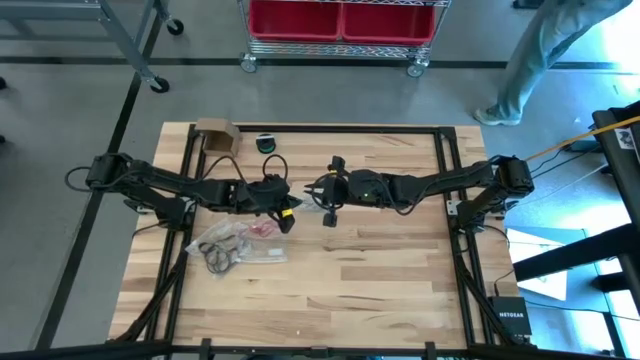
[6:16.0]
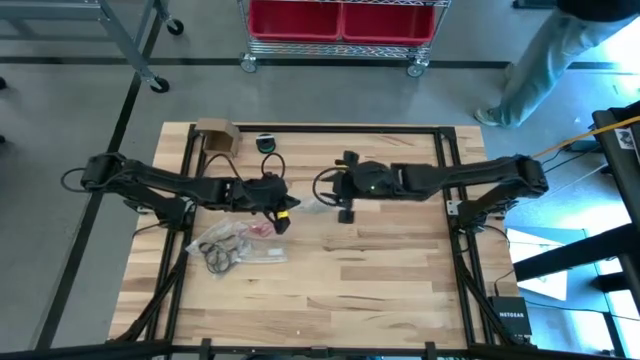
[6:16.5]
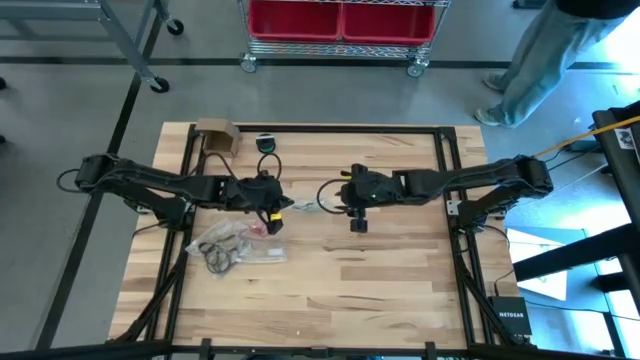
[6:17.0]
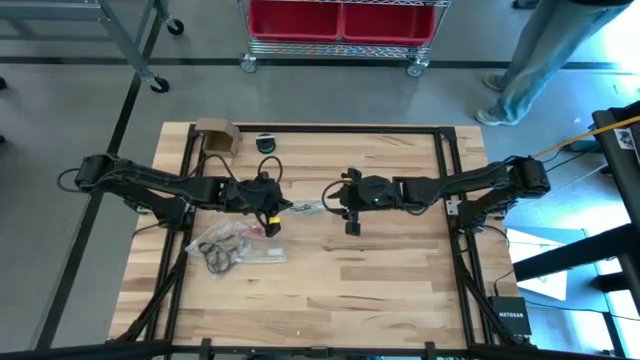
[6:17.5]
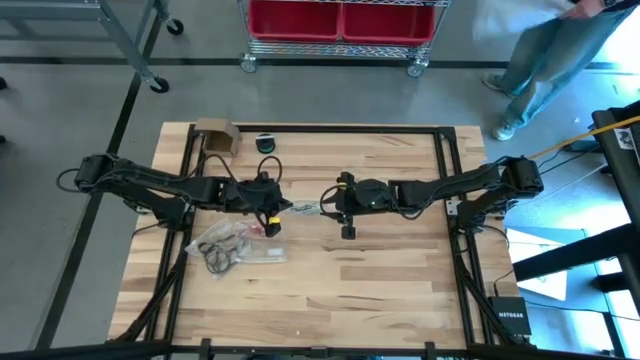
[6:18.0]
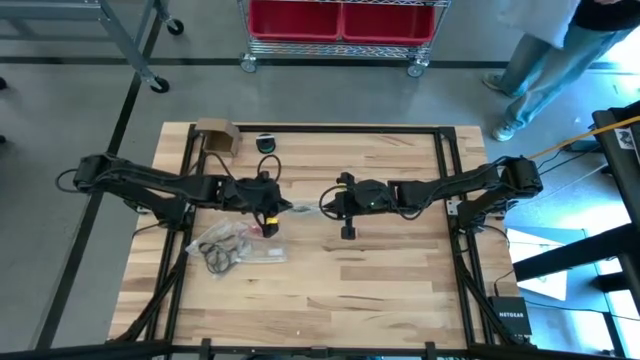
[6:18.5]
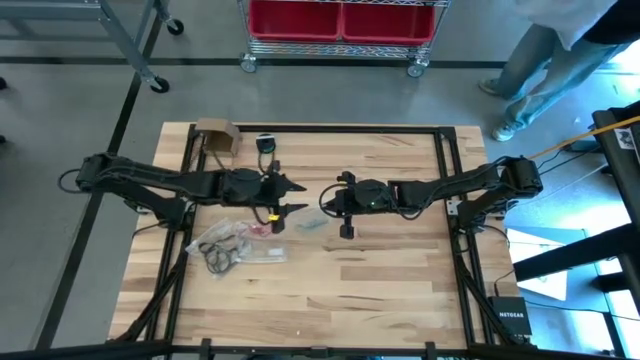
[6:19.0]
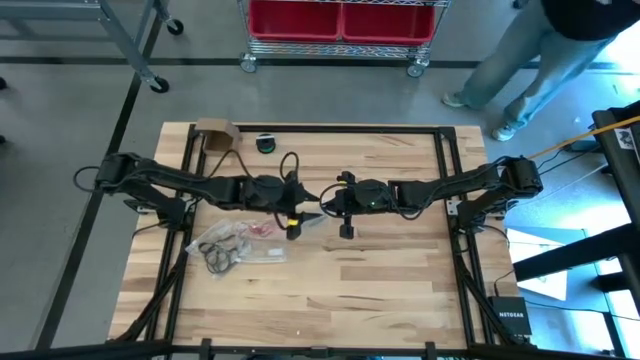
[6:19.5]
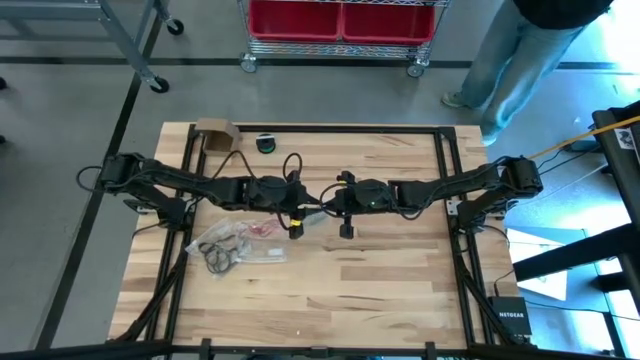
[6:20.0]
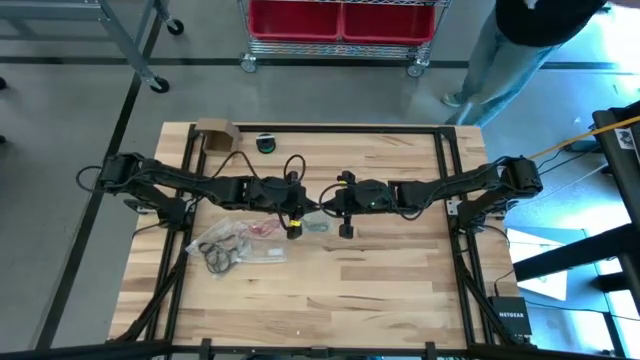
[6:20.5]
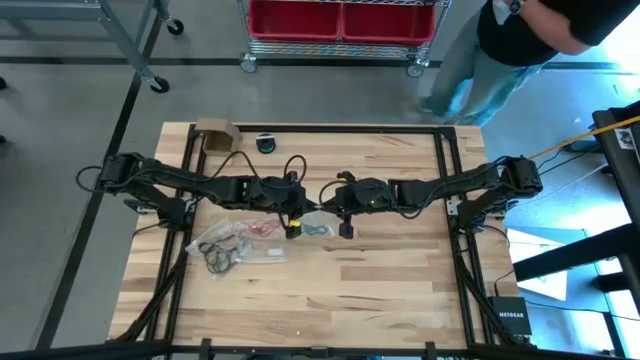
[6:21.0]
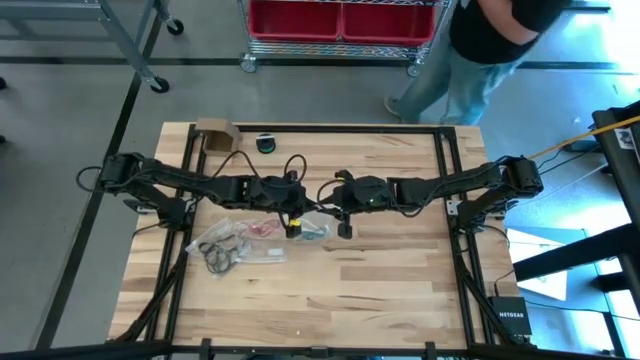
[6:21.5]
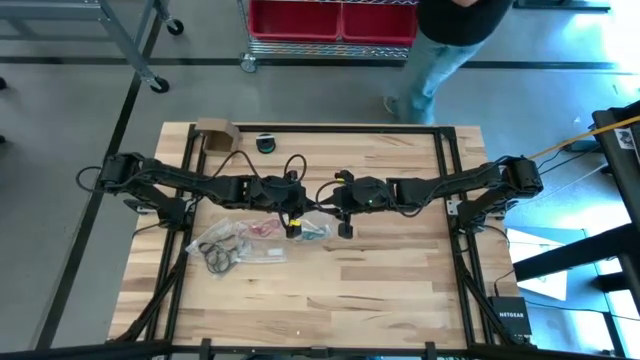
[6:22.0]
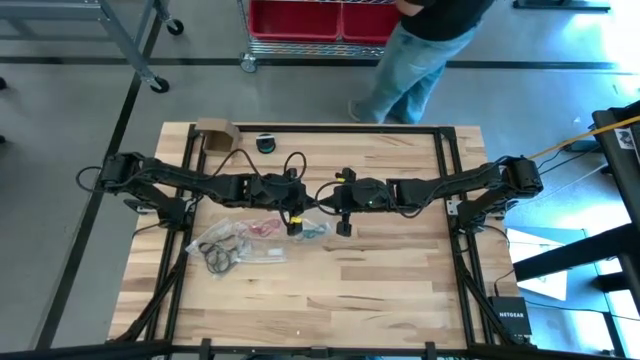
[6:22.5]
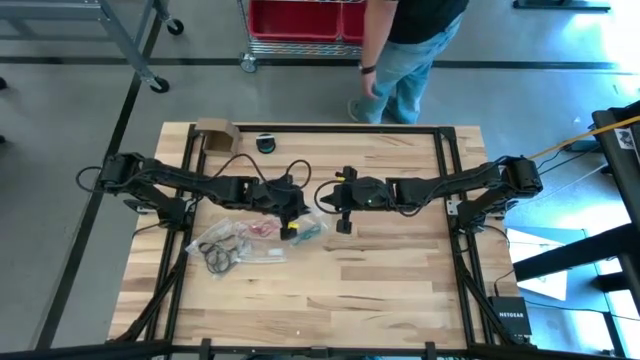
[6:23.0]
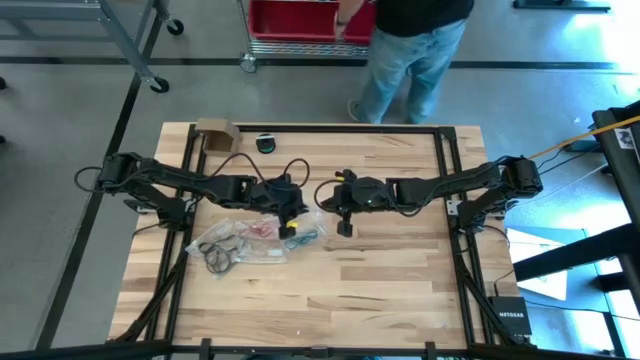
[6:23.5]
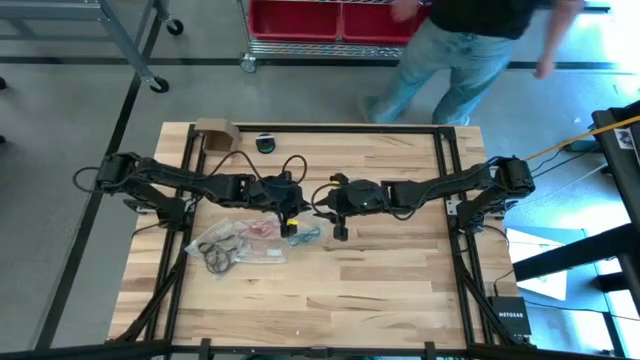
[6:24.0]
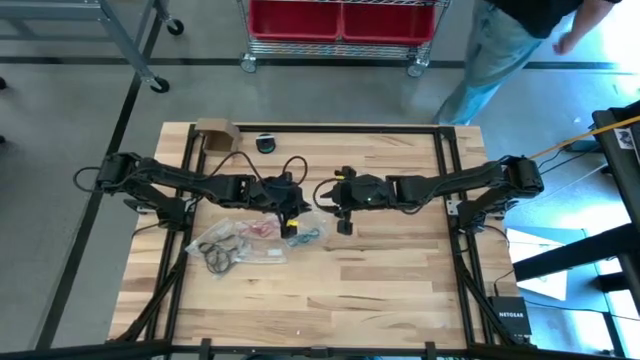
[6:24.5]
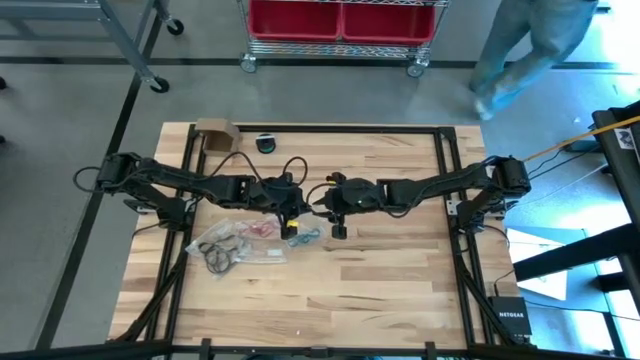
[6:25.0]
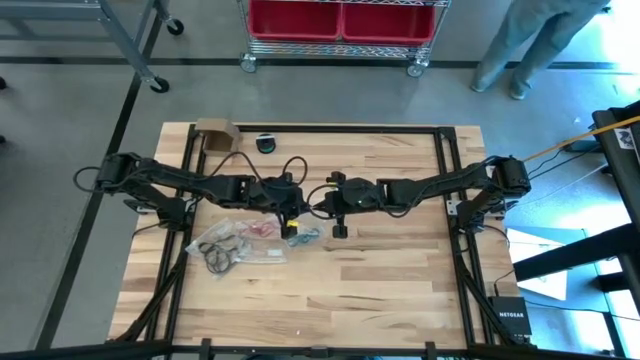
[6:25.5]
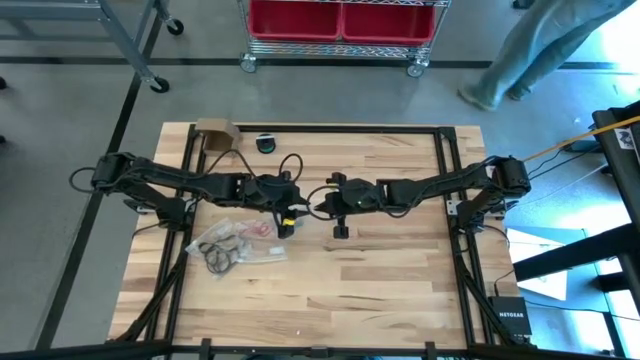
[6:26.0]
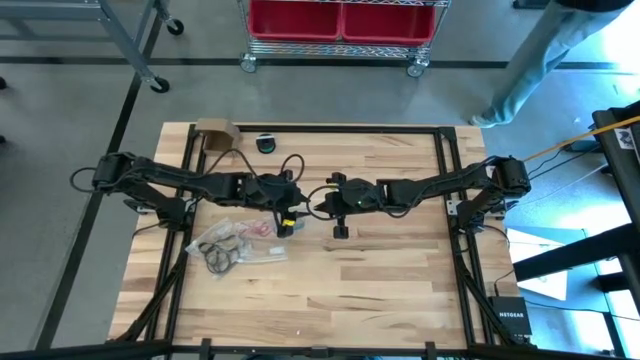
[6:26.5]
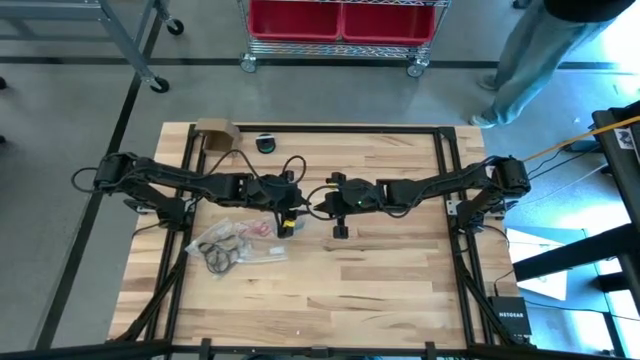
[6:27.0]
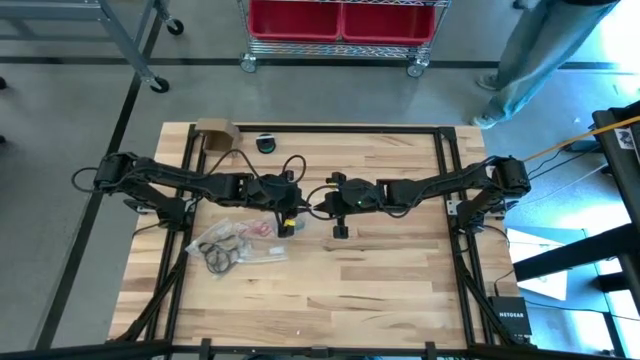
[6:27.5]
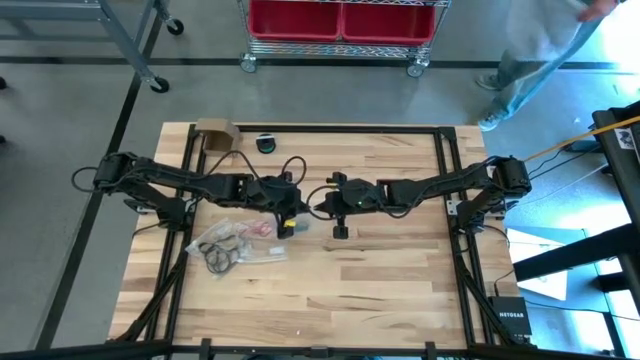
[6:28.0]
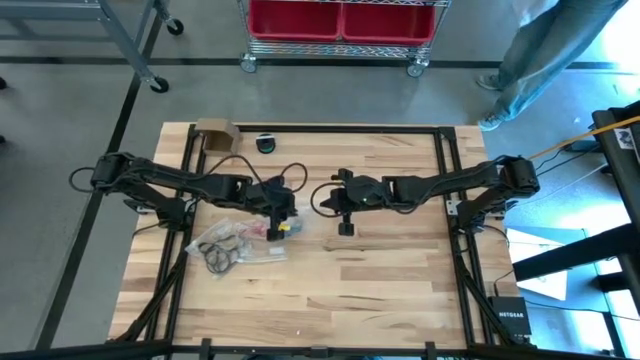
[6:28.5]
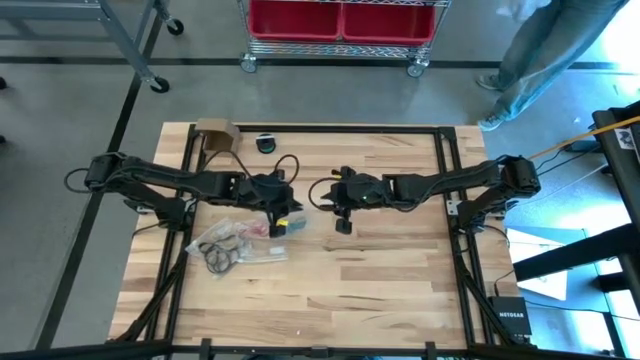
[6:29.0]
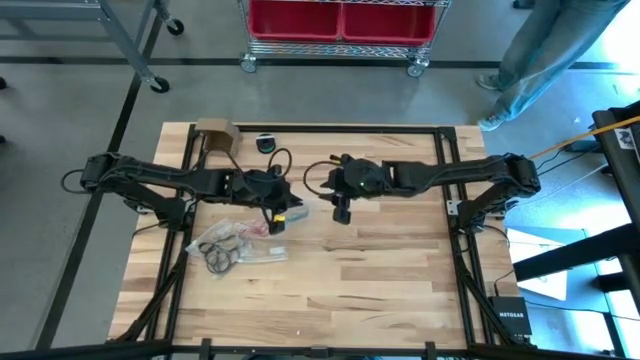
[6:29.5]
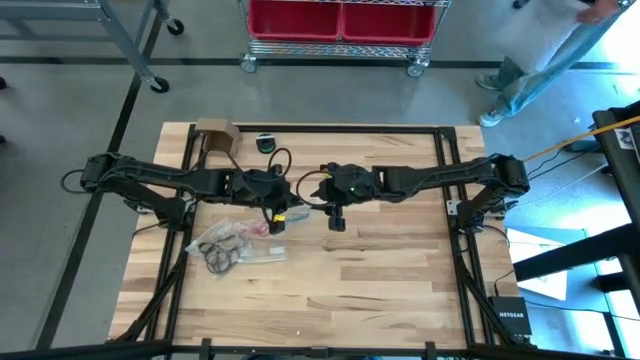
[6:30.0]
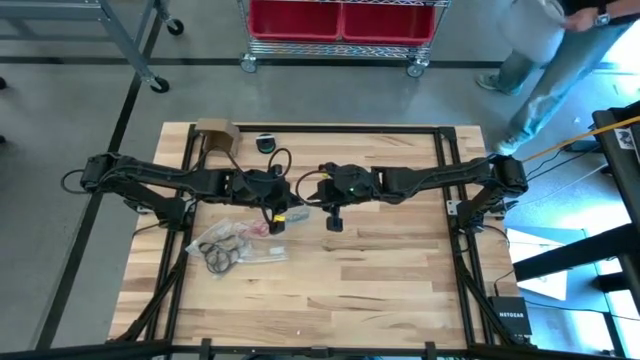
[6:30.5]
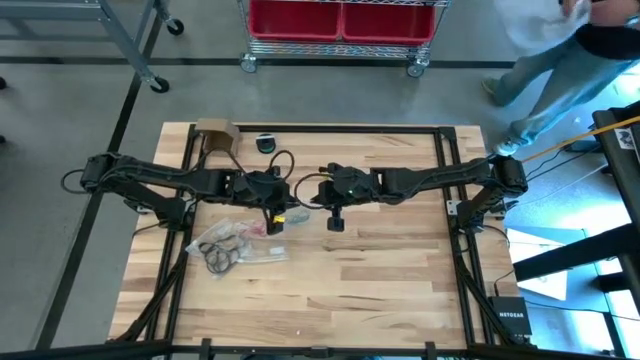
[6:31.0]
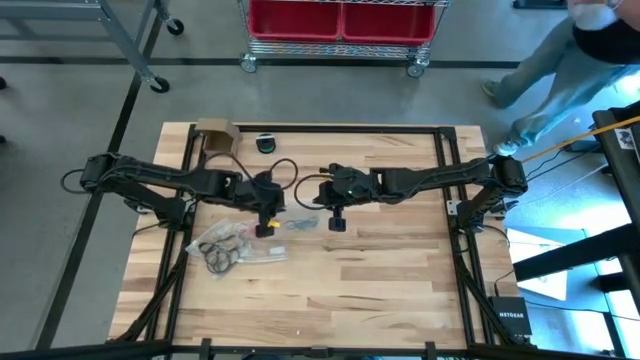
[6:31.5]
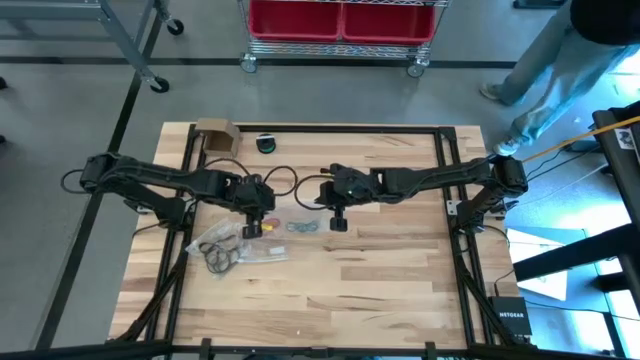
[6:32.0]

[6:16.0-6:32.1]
Task: Sort rubber bands
Close the transparent zip bag

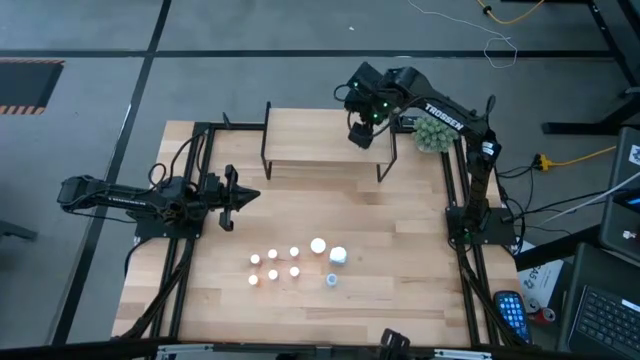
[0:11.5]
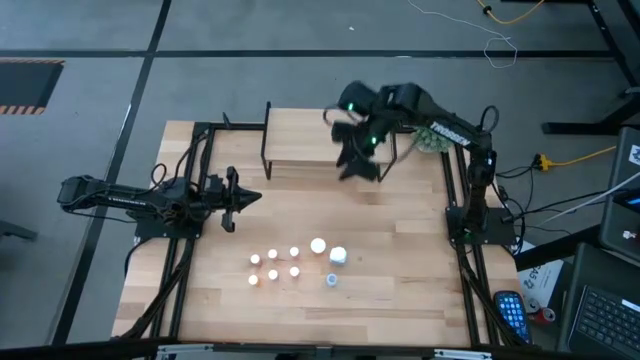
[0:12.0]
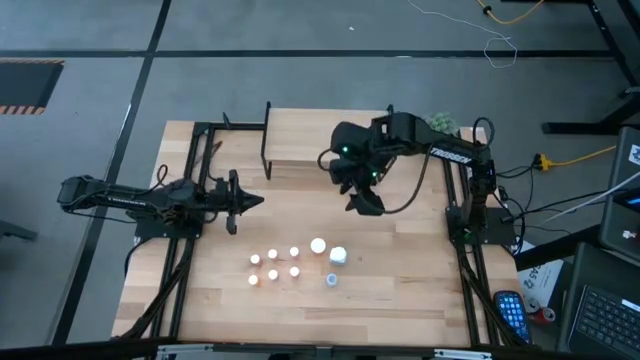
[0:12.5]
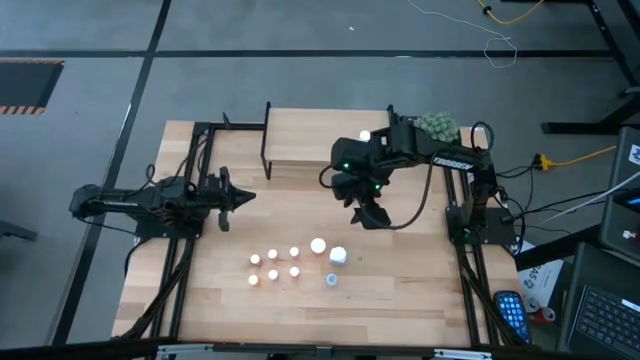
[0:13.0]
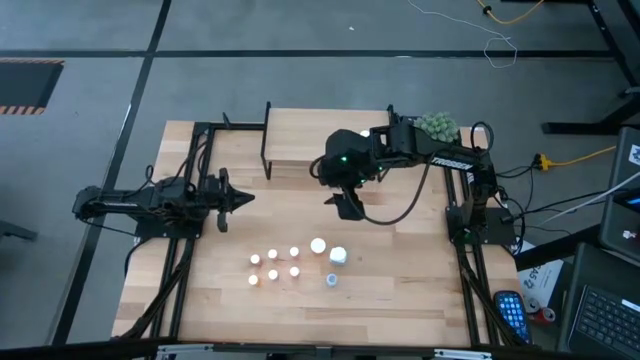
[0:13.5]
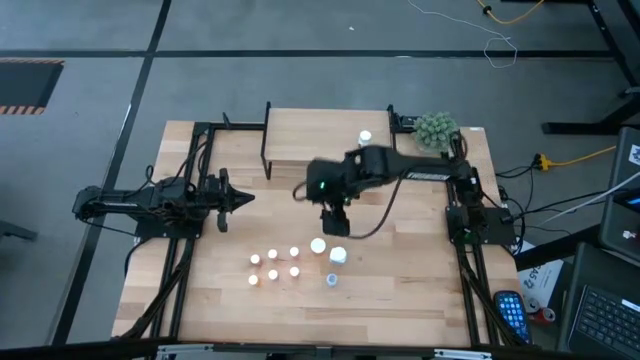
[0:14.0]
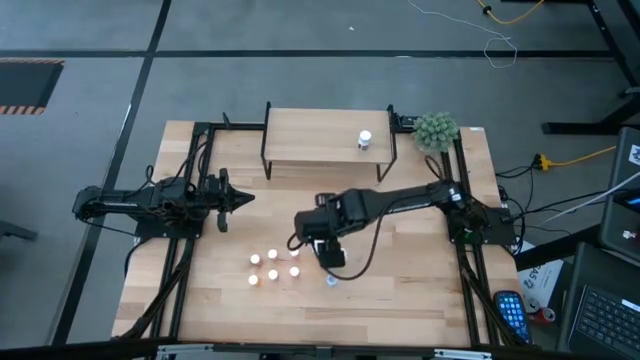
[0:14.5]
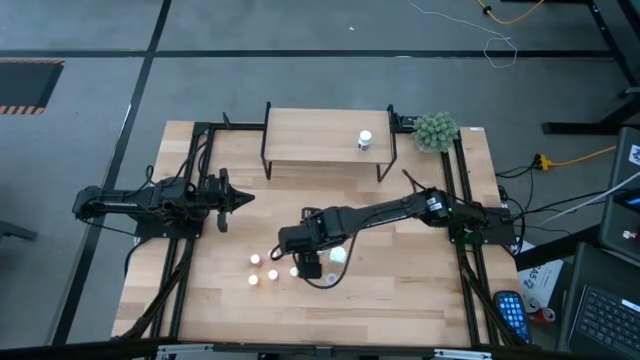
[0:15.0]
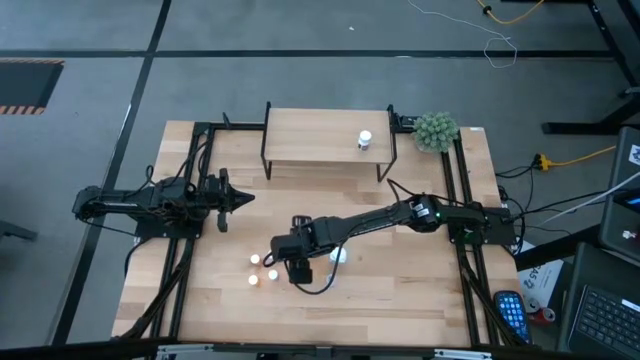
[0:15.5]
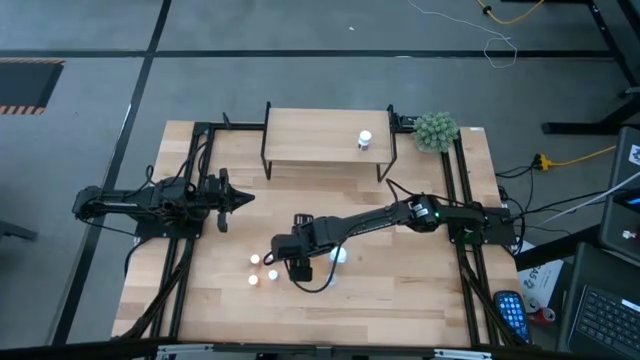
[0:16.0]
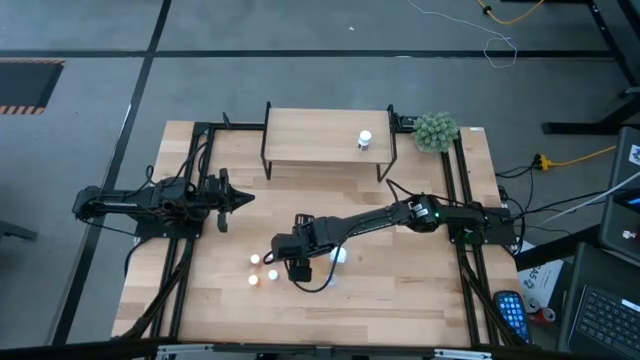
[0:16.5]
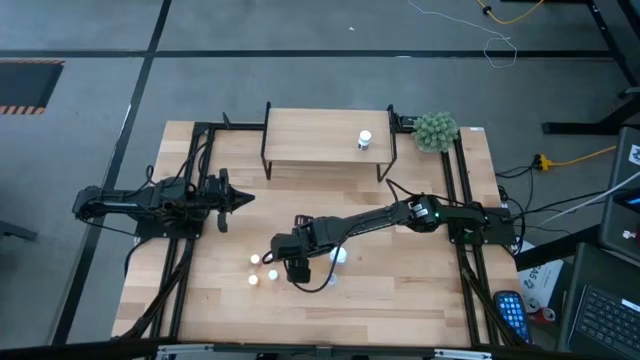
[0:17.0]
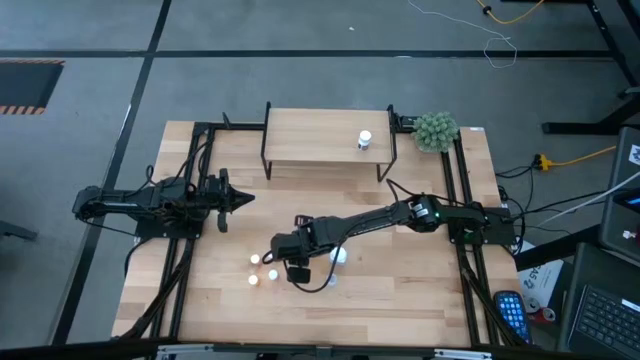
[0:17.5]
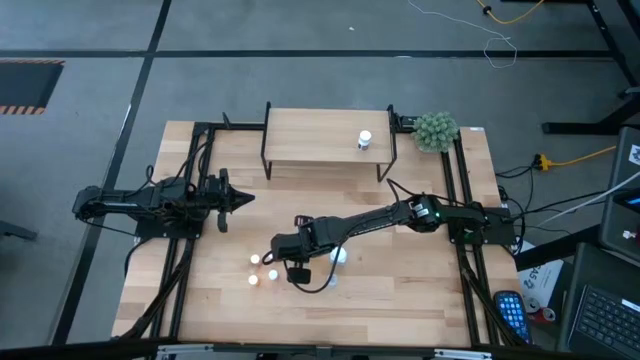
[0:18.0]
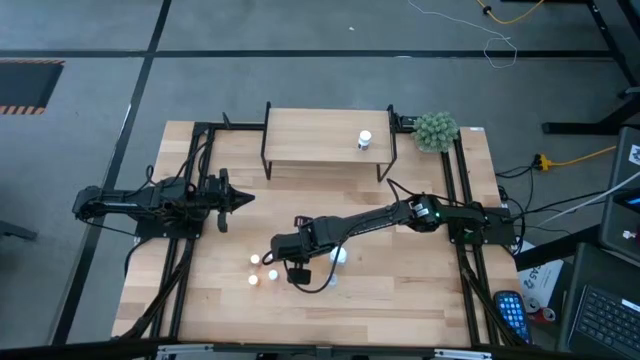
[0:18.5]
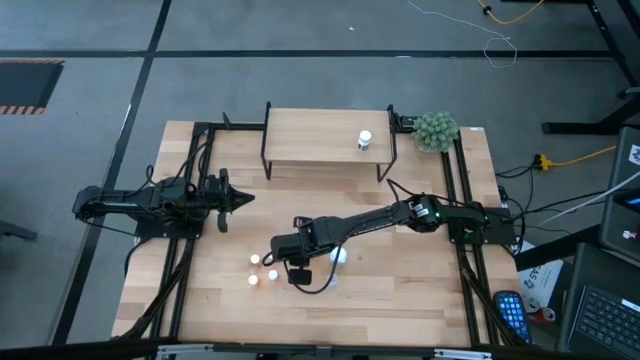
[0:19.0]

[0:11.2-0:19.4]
Task: Pick and place medicine bottles onto shelf by color
Put the light orange pill bottle on the shelf
